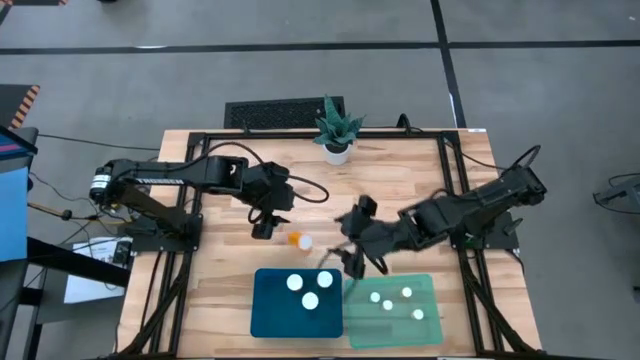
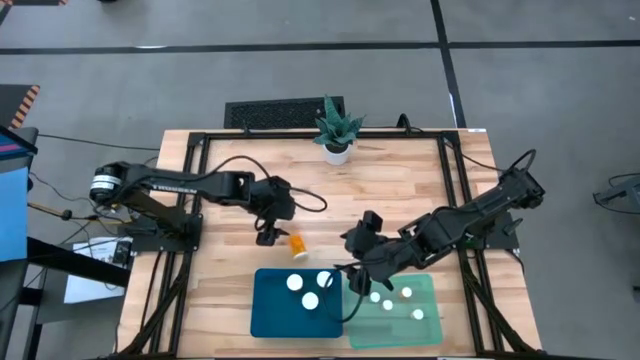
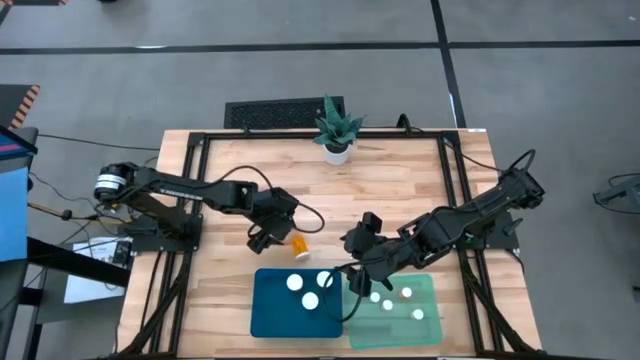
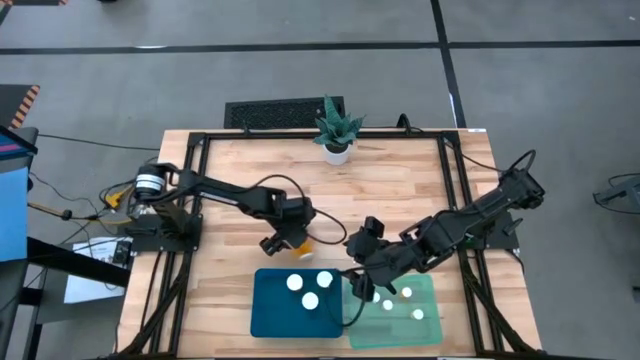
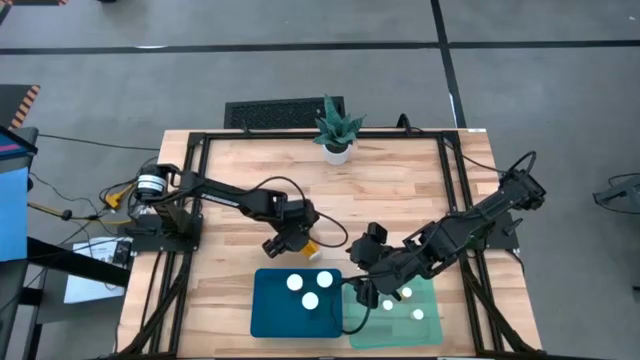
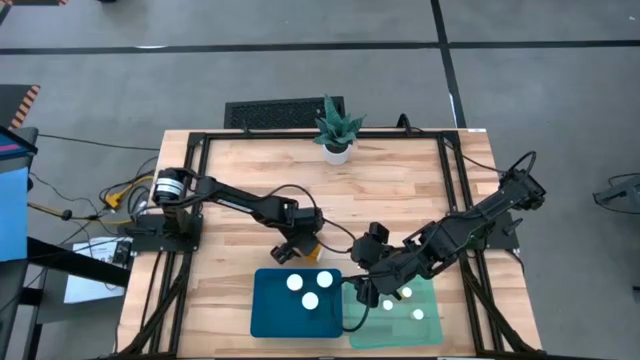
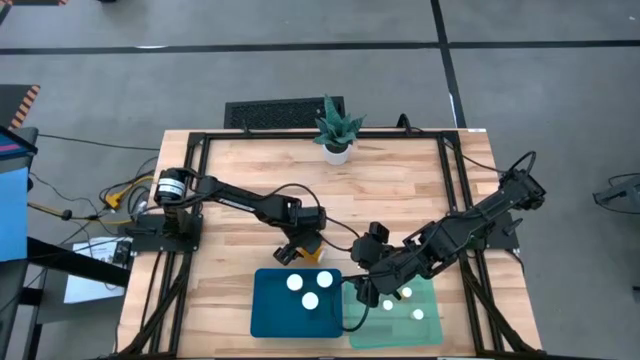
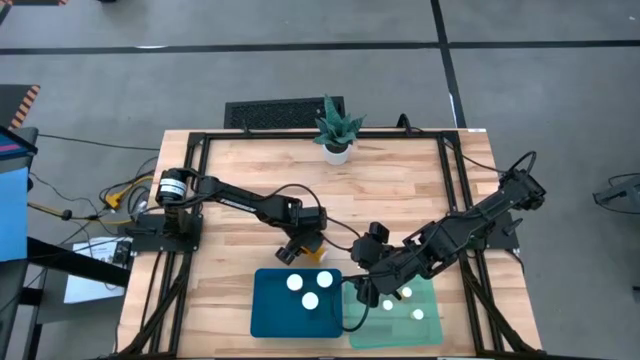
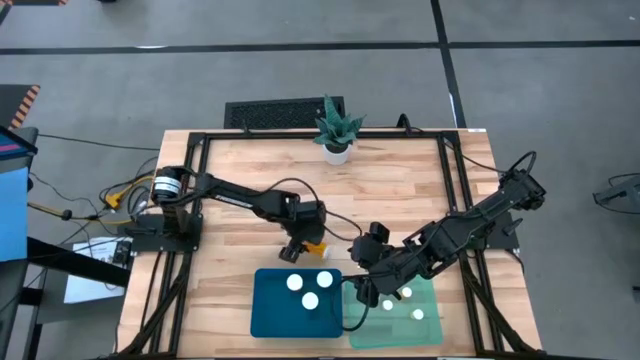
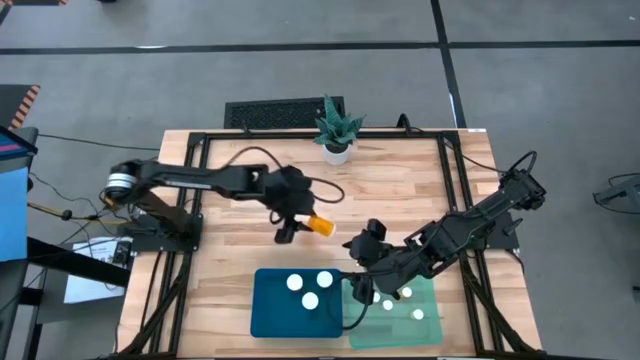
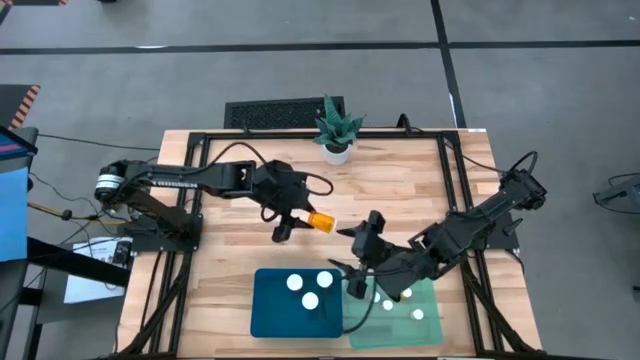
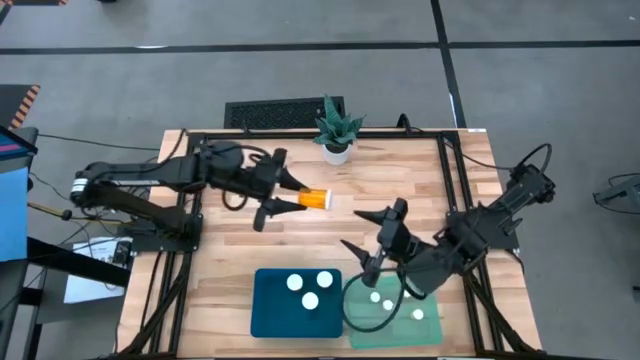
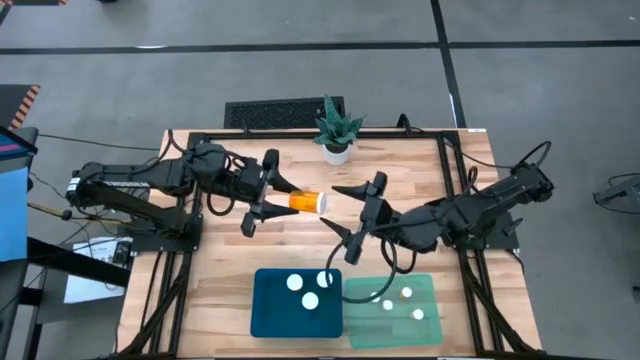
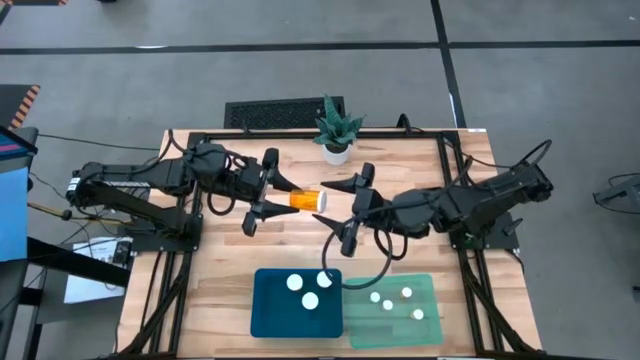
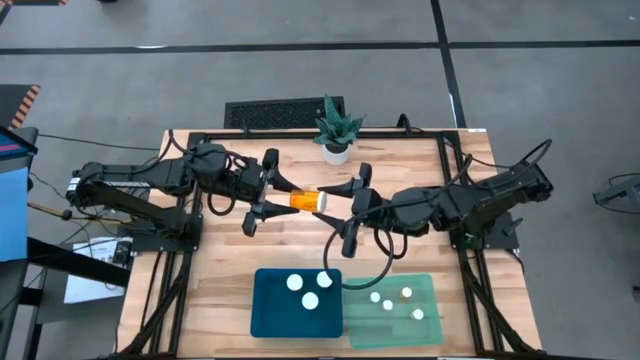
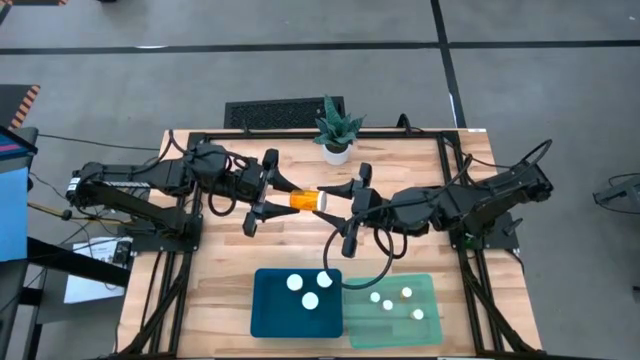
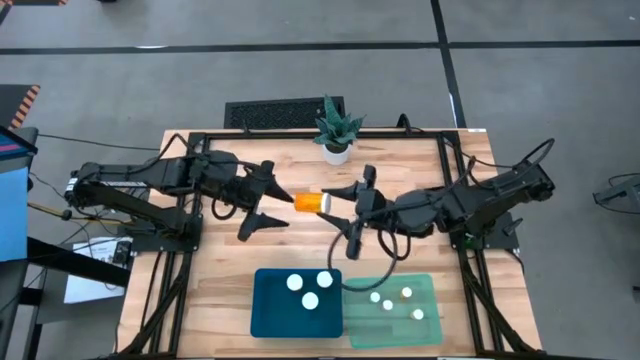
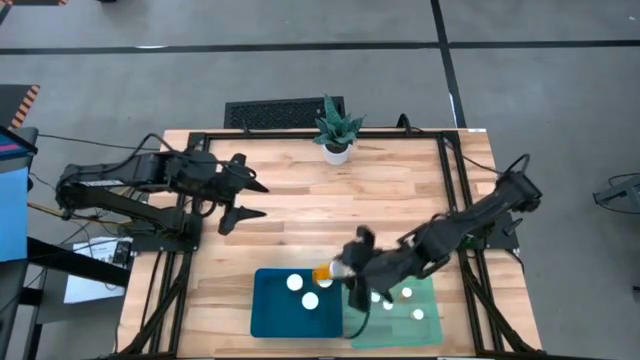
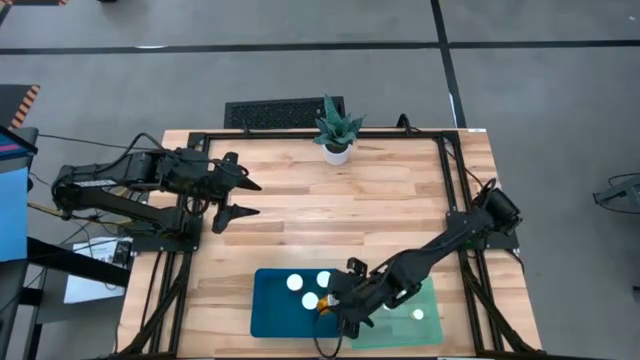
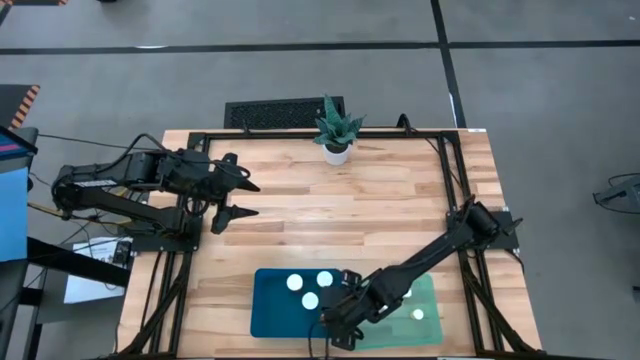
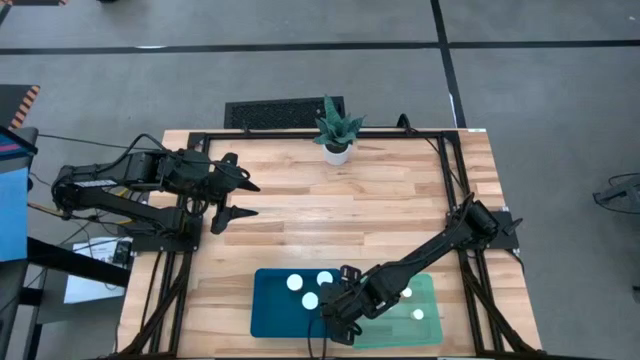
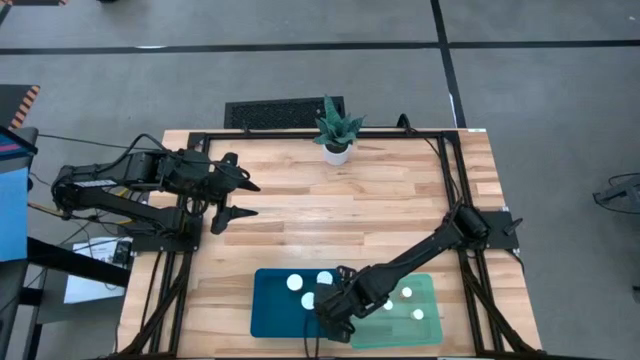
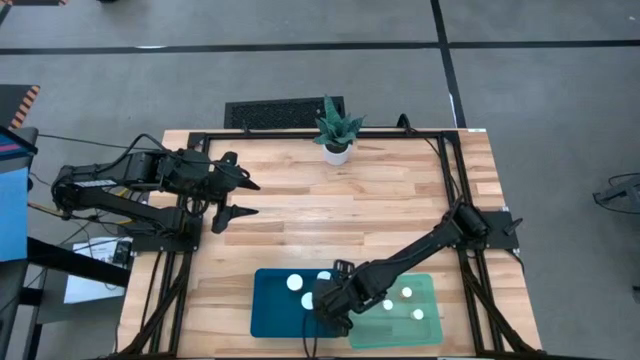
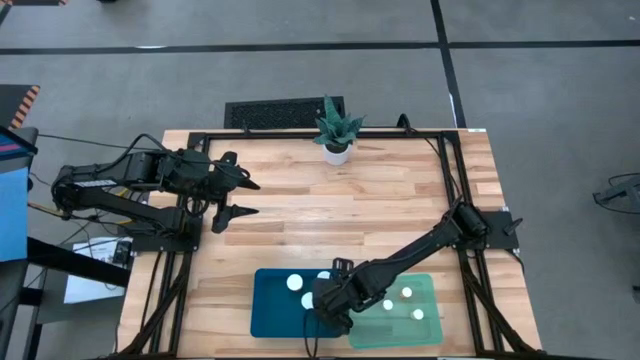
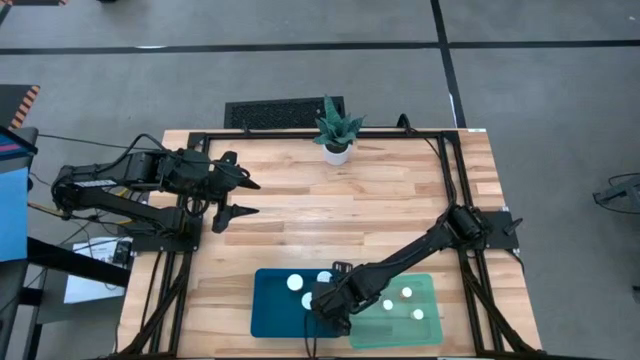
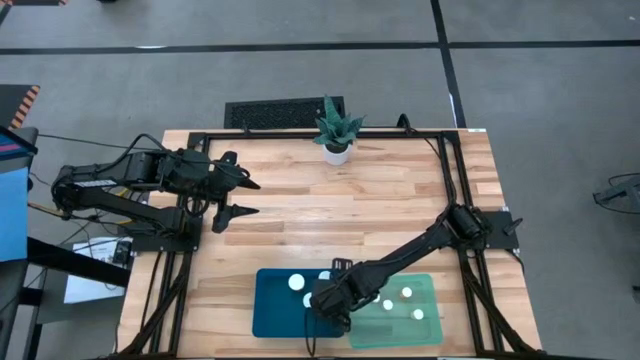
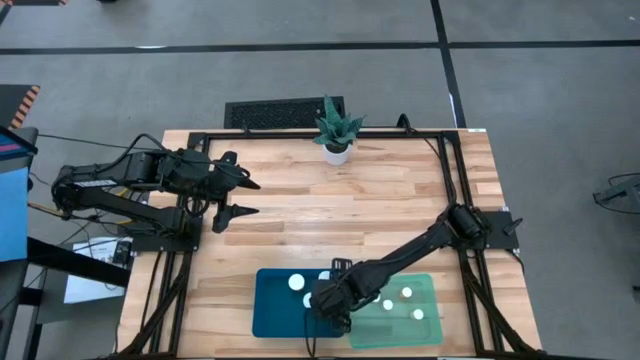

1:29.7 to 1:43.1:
Task: Pick and place medicine bottles into bin by pill shape (circle, oval)
Put the large orange pill bottle into the blue bin

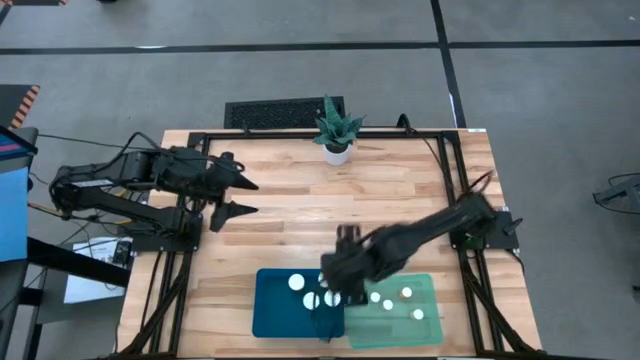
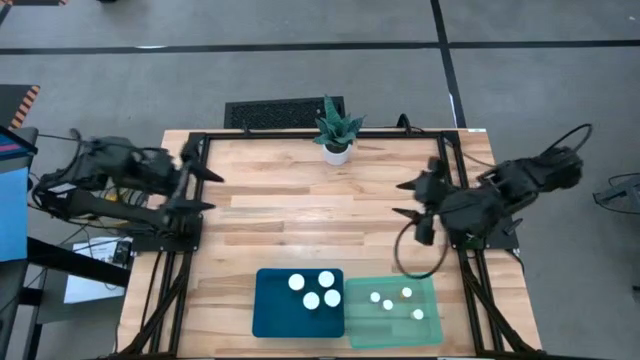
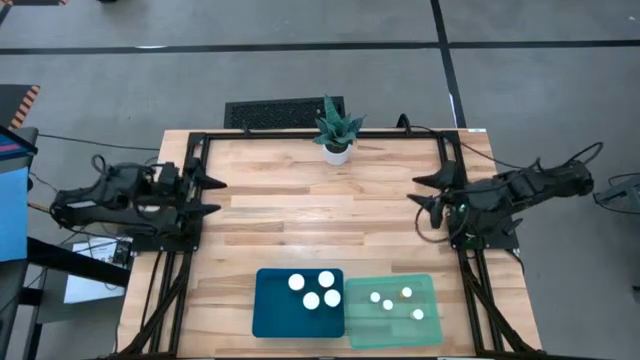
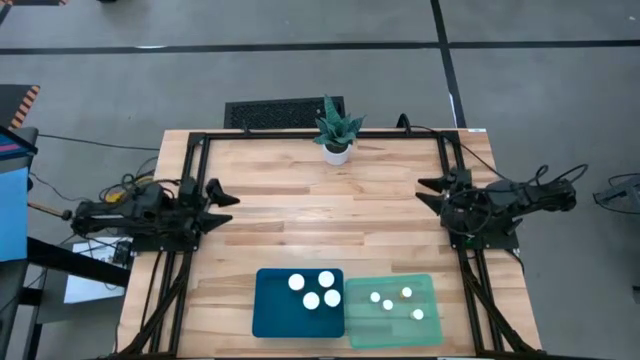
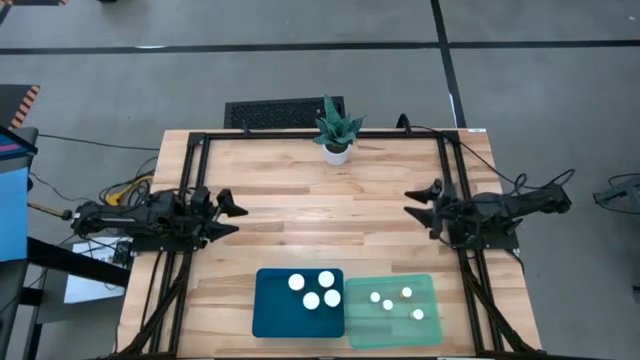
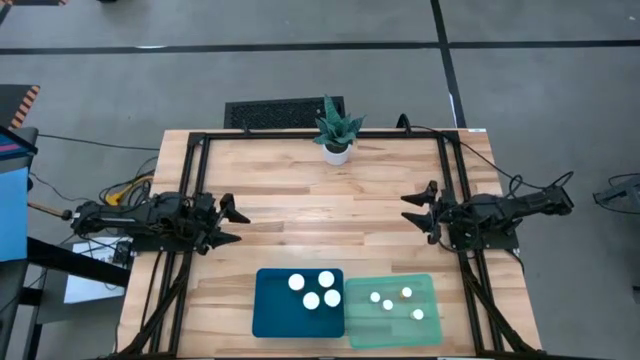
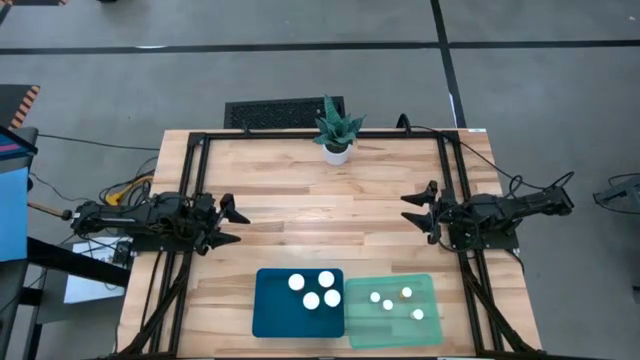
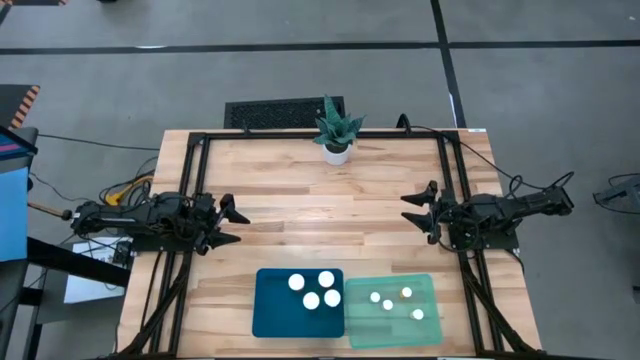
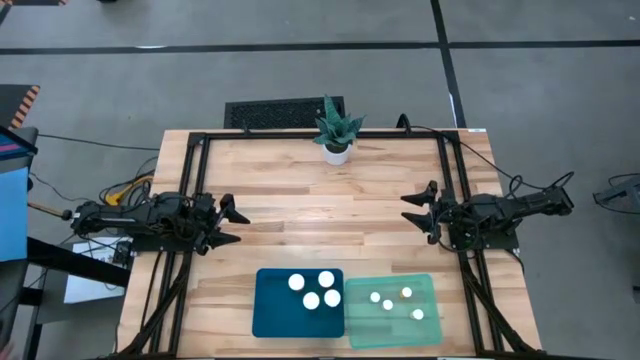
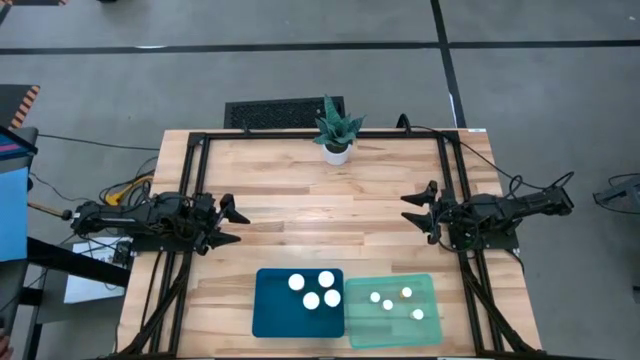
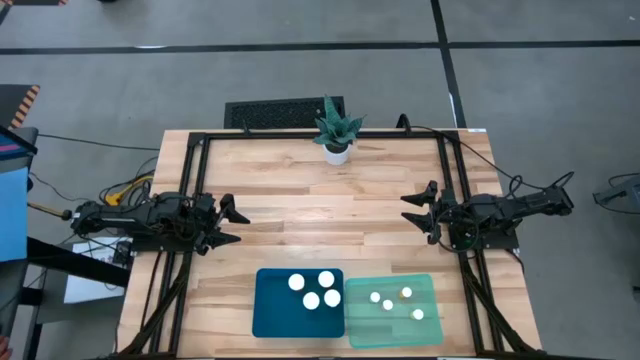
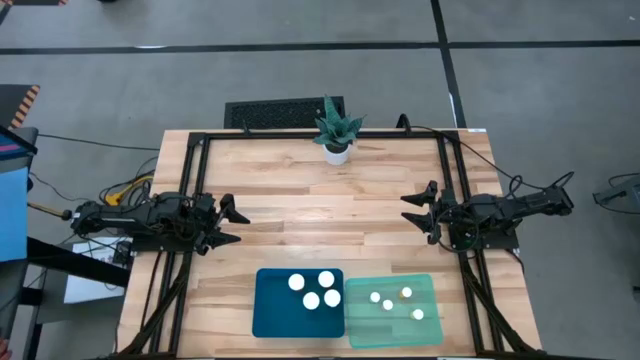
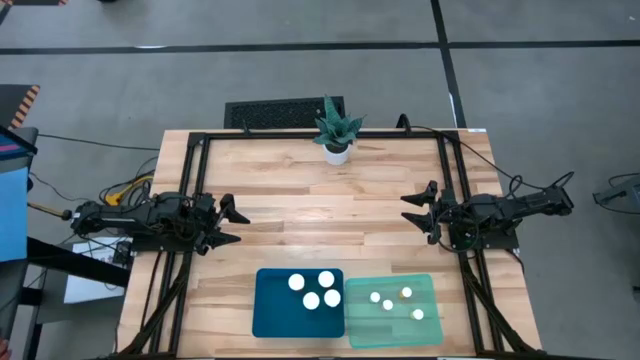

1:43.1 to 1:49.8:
Return to Home Position

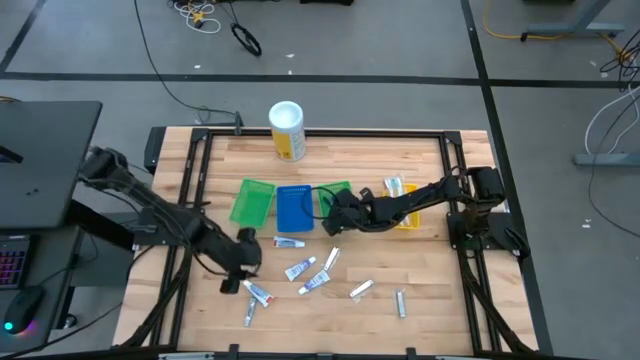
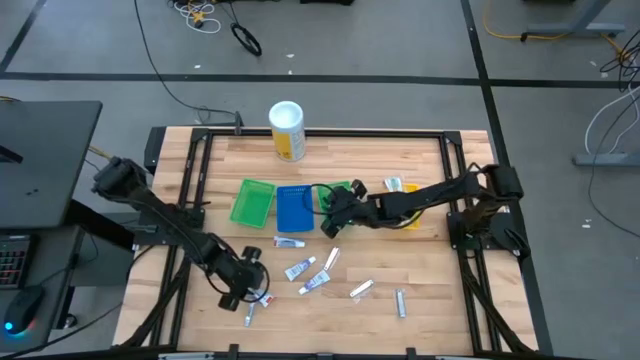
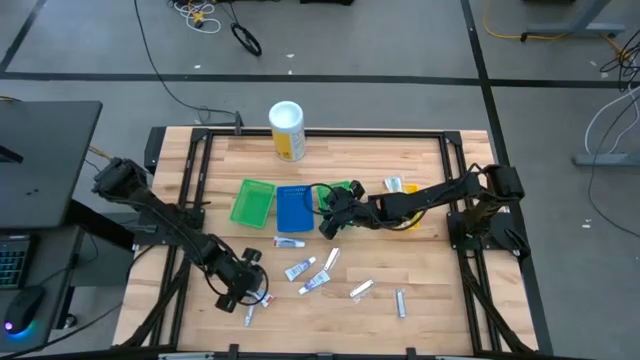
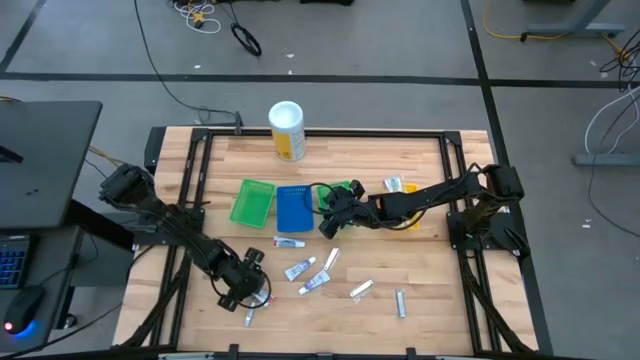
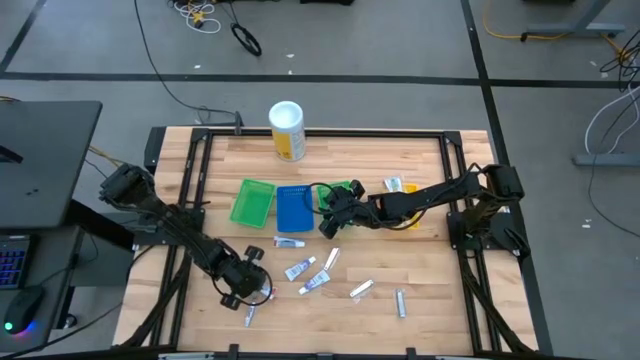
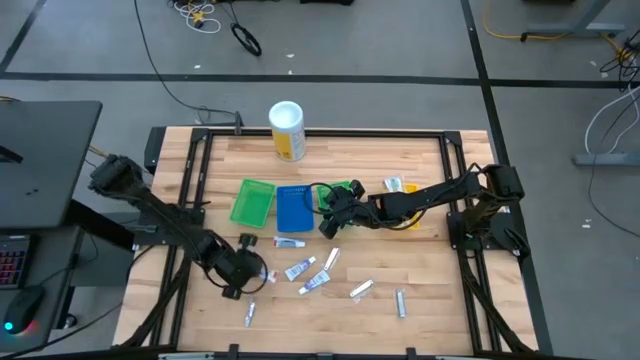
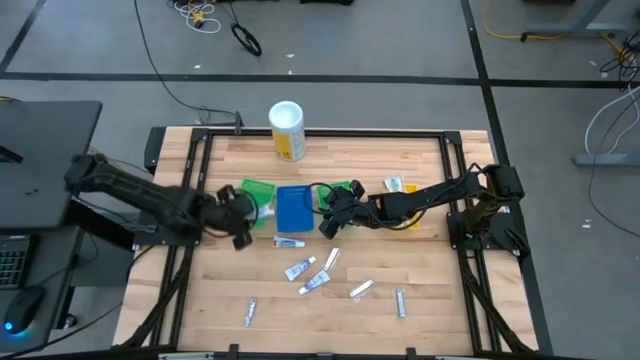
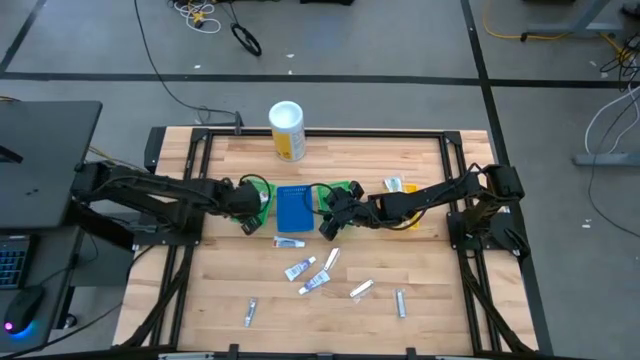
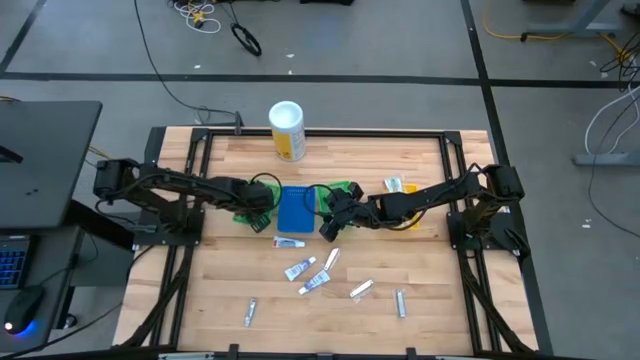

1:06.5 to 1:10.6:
Task: Pick & Place Travel size toiletries
Put the purple and white toothpaste into the left green bin
